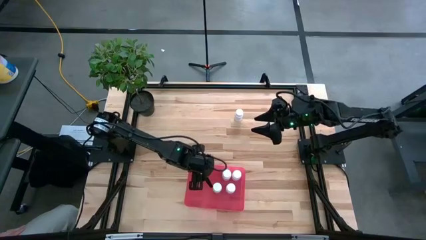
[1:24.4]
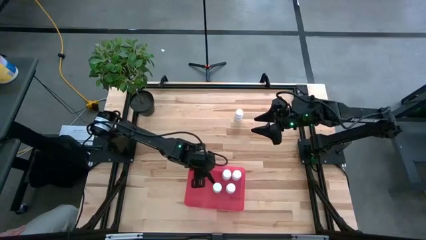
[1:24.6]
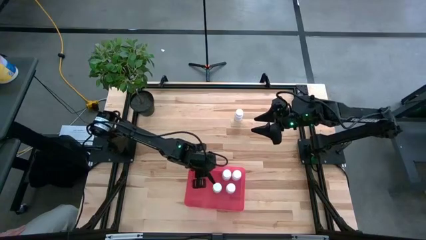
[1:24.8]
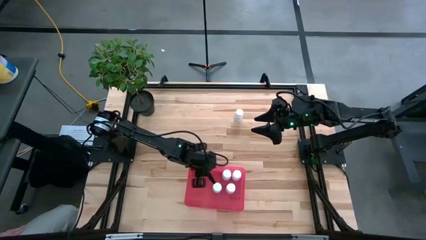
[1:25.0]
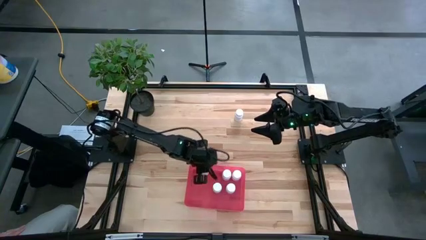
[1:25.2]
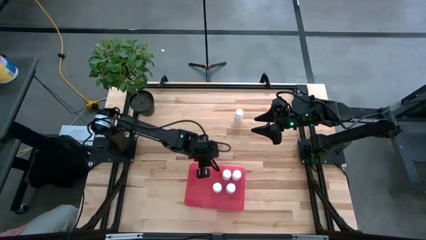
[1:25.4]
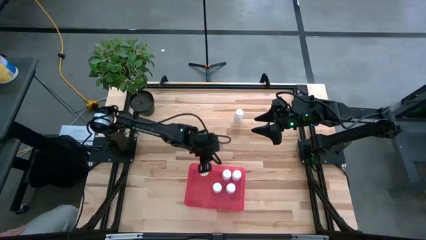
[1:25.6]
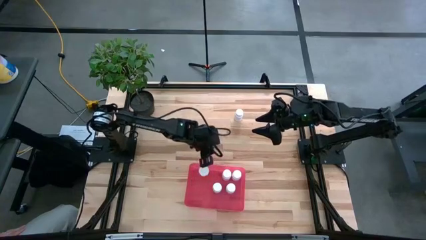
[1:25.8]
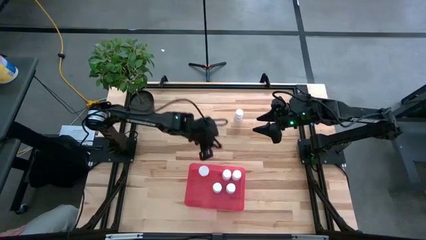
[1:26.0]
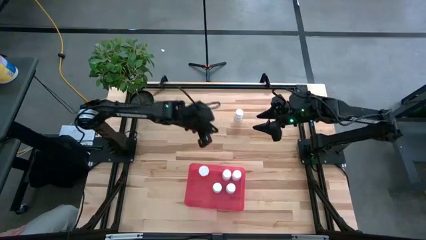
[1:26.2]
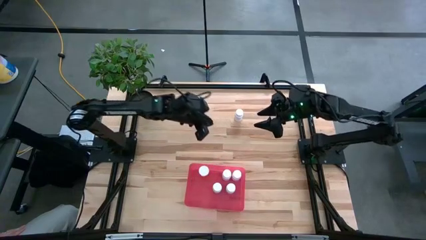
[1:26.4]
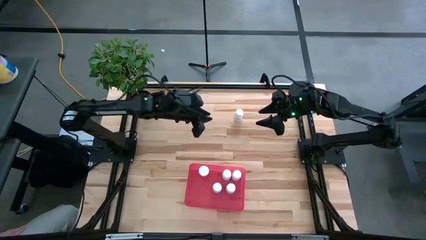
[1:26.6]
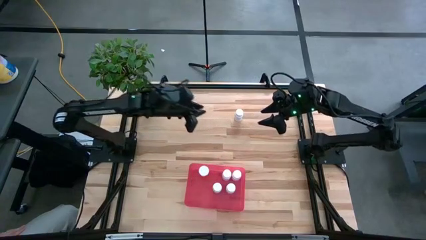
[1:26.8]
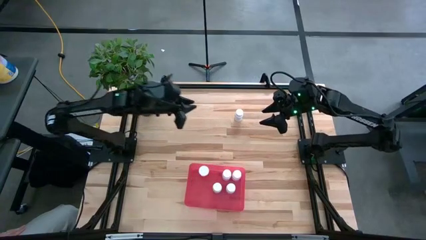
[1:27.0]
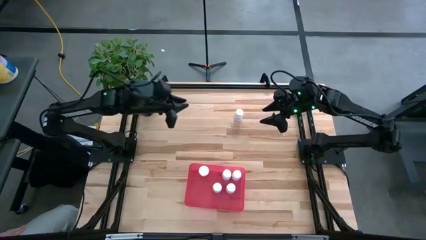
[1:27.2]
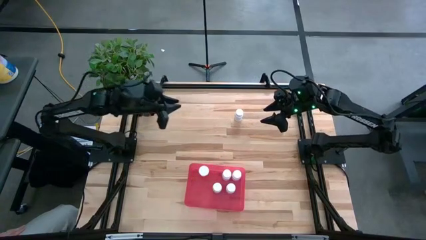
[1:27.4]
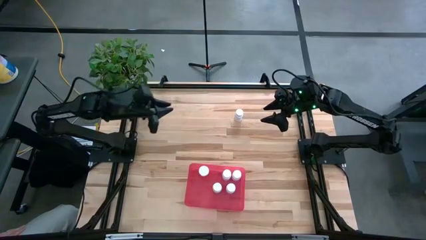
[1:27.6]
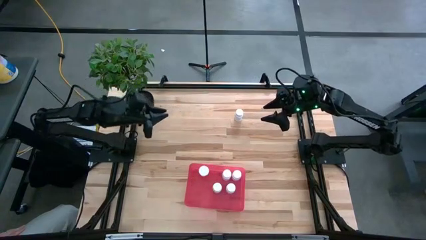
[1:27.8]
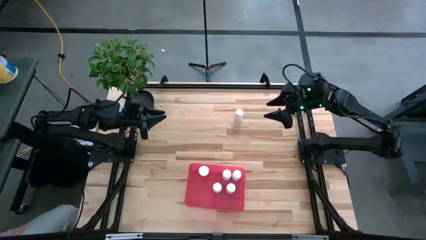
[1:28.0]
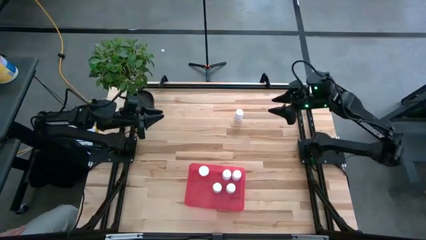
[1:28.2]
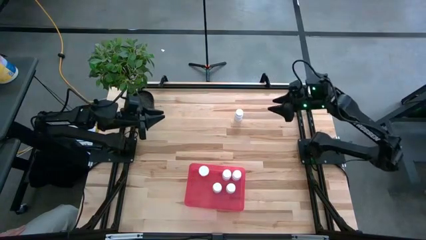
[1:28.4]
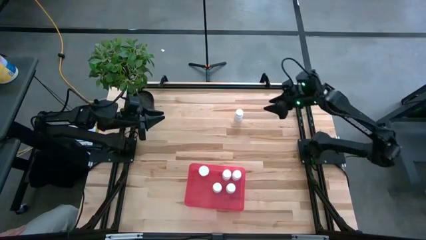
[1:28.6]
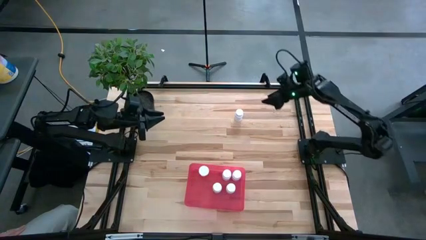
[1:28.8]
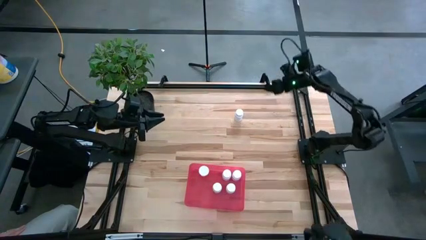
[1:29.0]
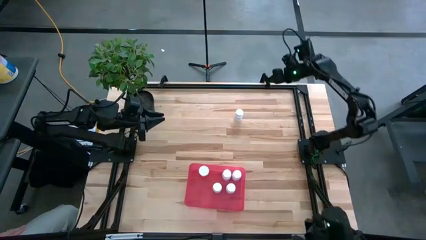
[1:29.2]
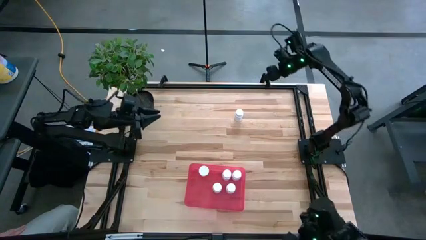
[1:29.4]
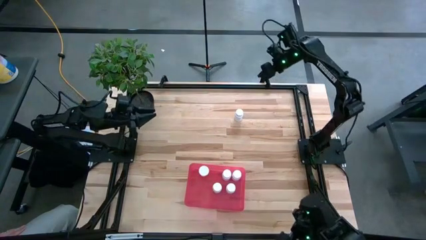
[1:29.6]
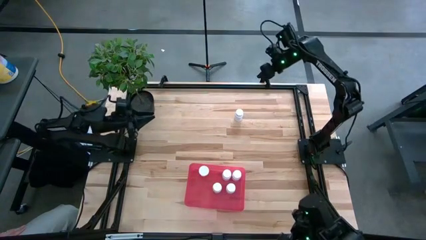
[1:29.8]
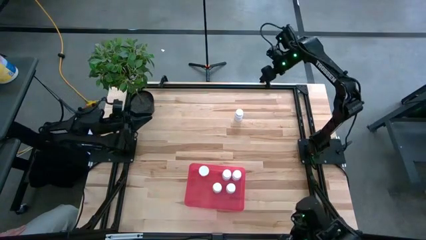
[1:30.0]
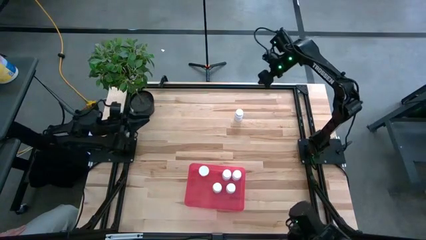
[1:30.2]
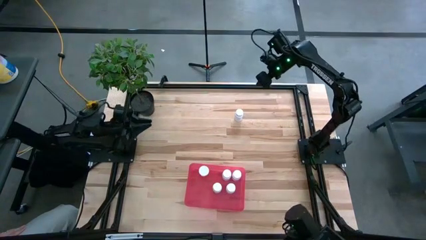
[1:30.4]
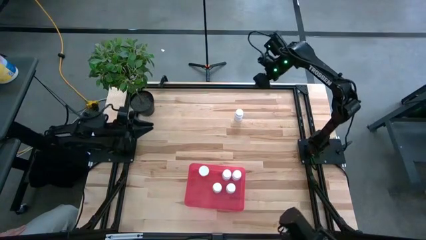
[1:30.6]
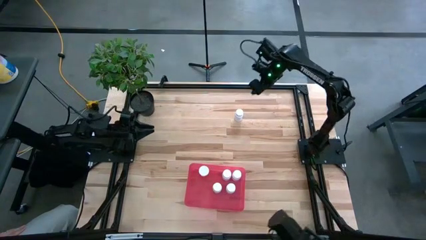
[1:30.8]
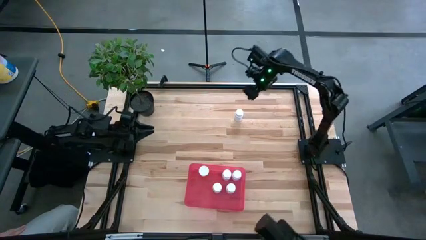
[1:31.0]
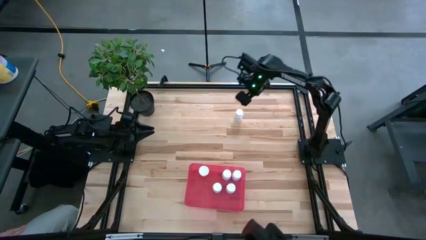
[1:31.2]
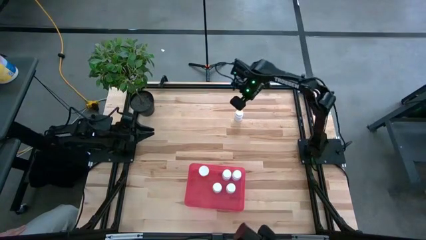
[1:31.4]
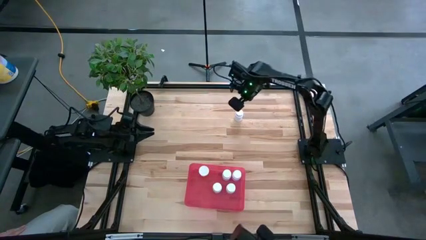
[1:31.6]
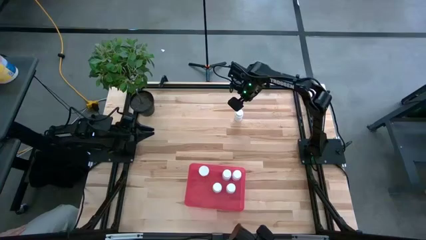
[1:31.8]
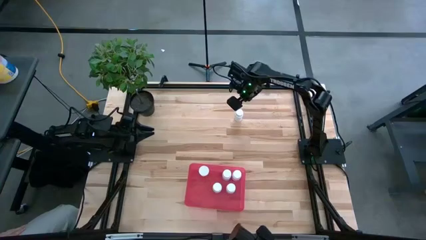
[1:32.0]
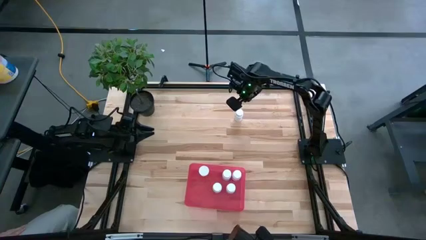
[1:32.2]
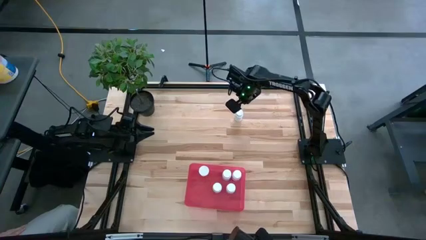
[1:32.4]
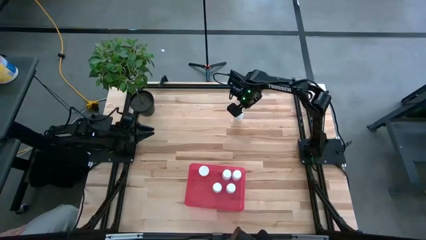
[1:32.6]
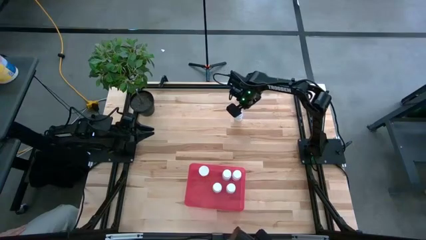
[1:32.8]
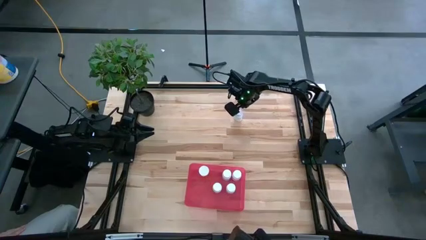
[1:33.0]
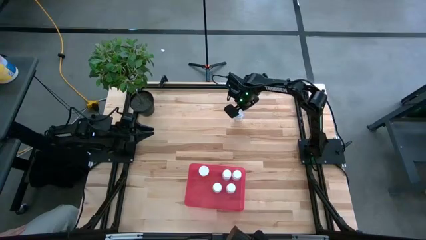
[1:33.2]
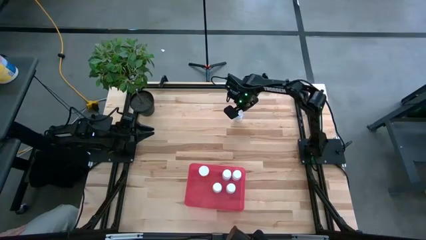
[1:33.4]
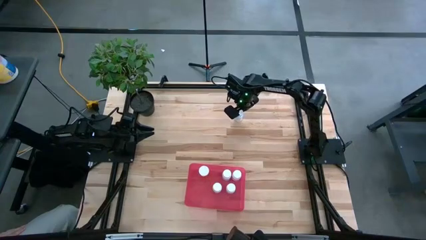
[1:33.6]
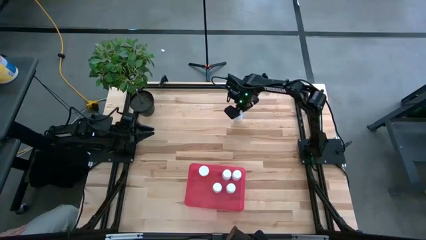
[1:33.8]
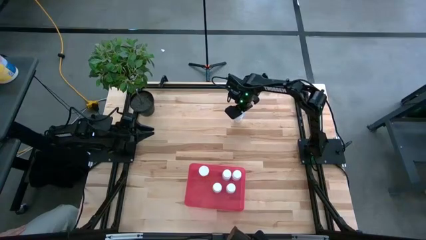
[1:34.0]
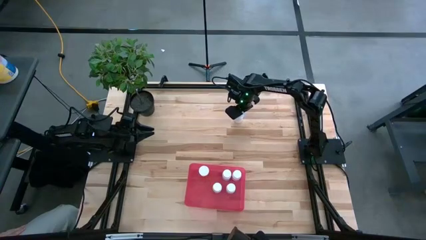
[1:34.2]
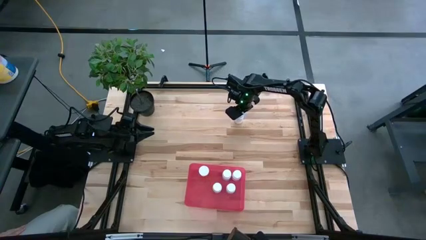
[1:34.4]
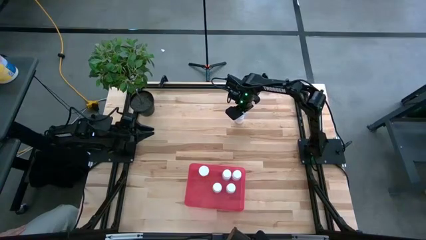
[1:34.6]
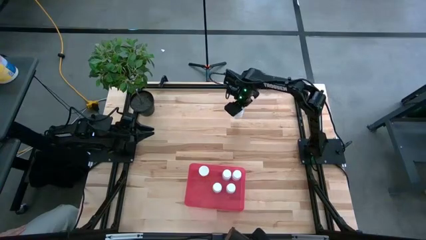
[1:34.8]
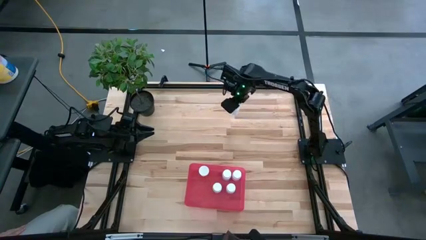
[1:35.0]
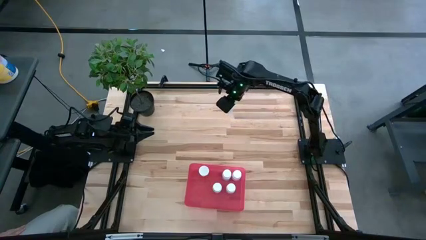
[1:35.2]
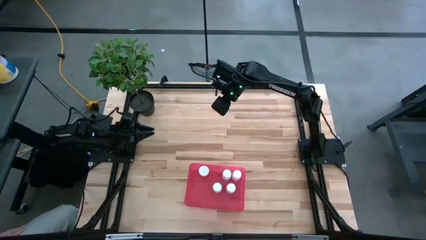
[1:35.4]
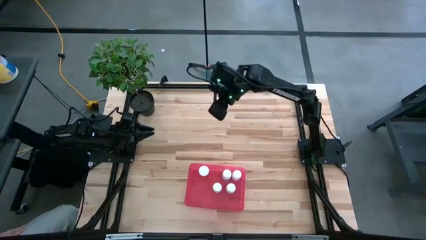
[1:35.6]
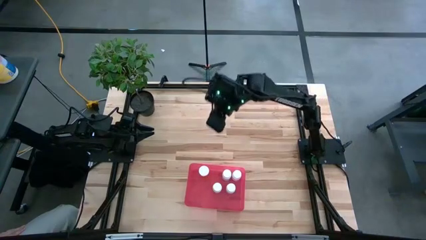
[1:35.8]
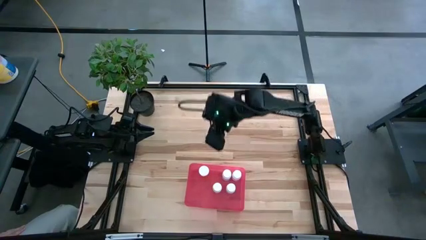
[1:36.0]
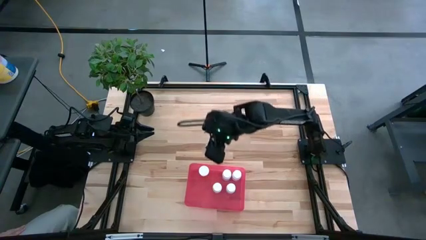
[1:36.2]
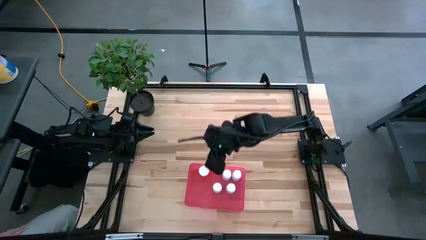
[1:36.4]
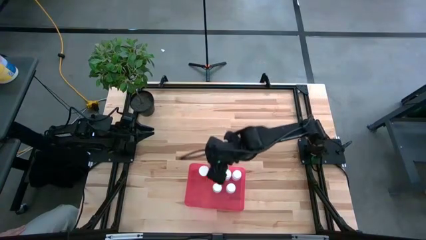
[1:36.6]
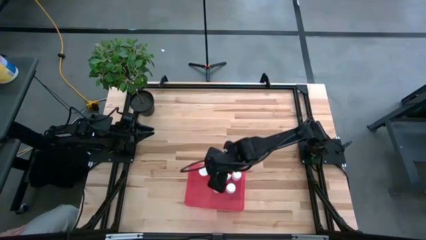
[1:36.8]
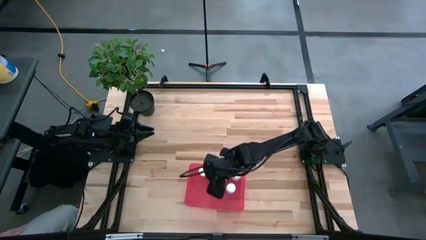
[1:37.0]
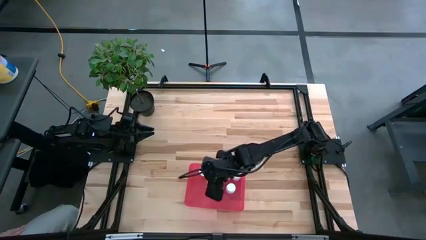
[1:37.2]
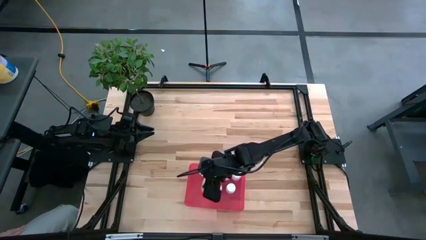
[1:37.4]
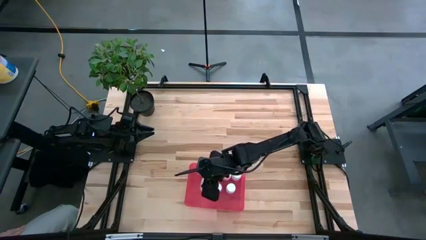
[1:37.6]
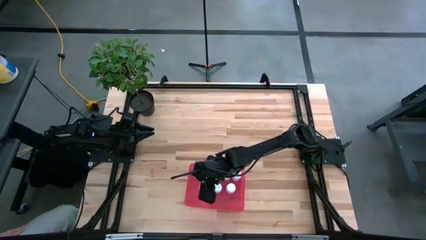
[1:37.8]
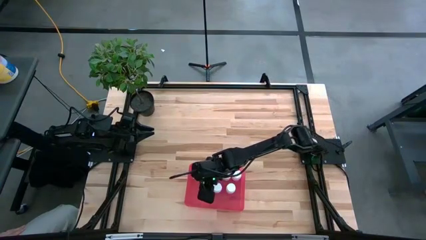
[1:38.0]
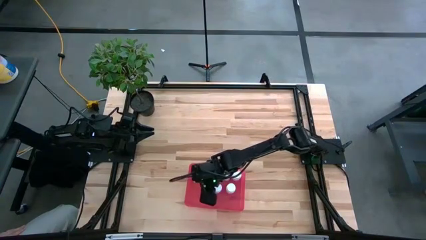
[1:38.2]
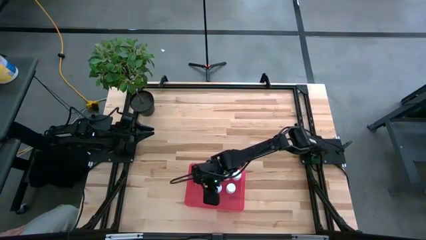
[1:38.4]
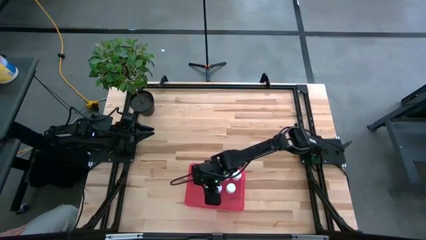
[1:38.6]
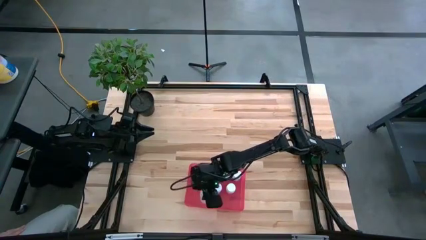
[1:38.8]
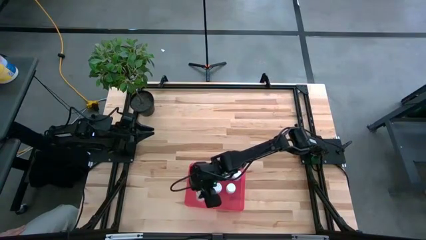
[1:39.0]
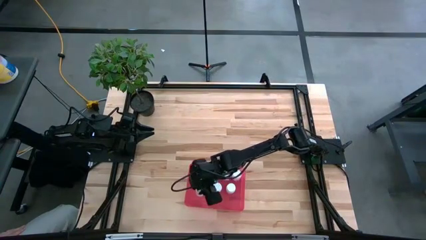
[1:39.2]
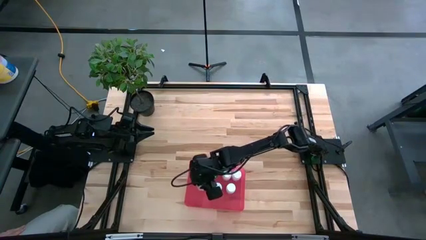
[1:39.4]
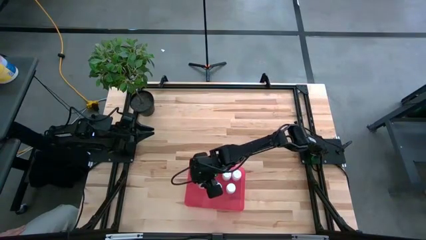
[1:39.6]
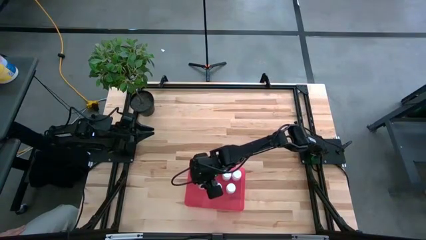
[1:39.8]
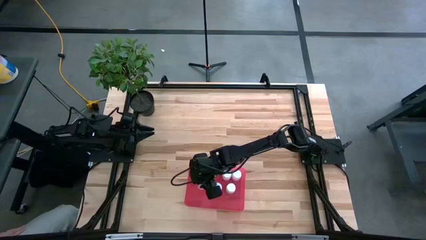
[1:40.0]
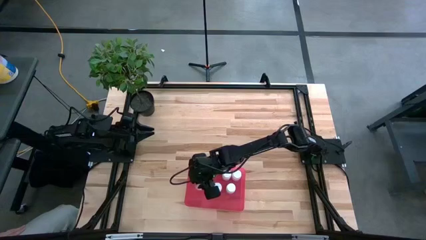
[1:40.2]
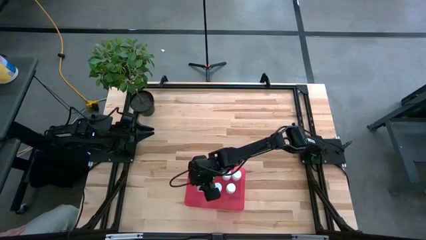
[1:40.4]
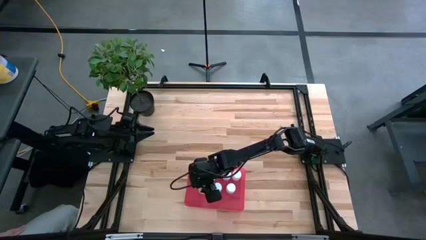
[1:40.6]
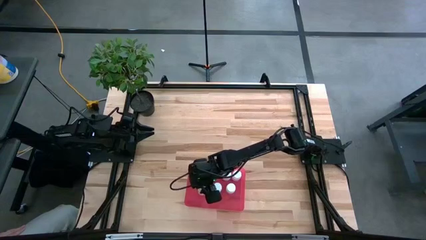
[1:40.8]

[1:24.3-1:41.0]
Task: Pick and place pill bottles into a basket
Put the white pill bottle into the red bin
